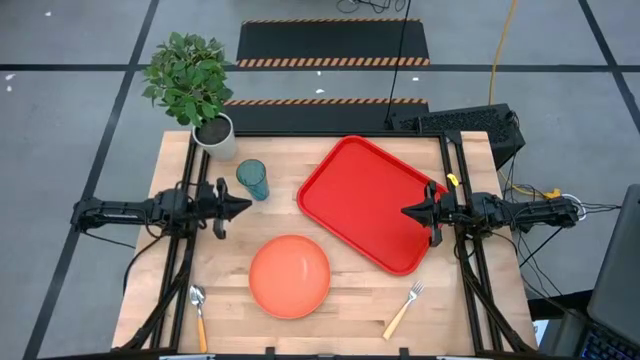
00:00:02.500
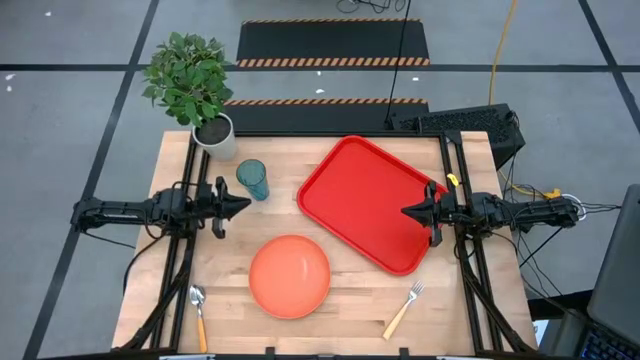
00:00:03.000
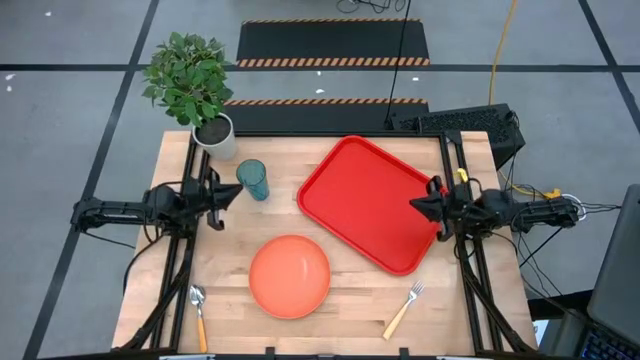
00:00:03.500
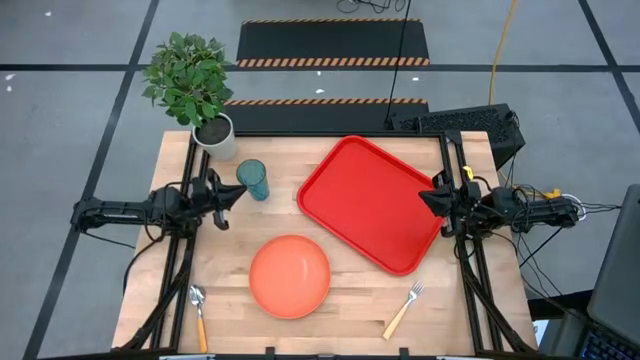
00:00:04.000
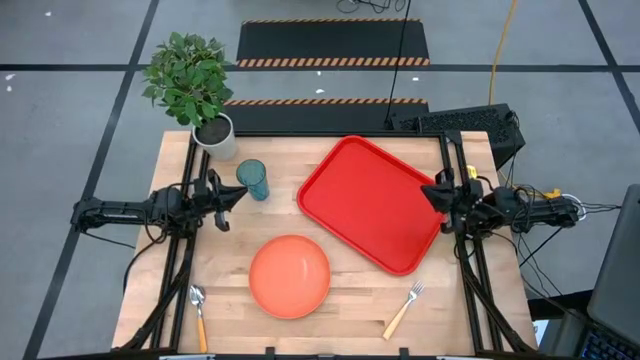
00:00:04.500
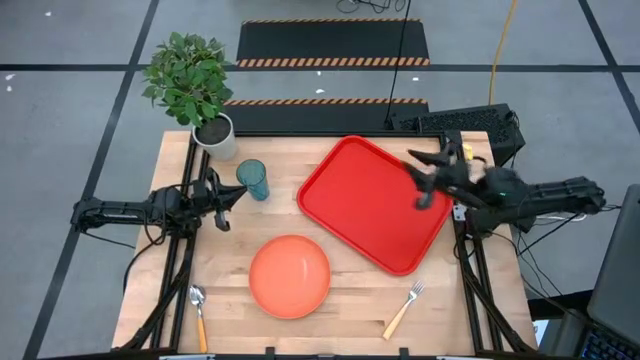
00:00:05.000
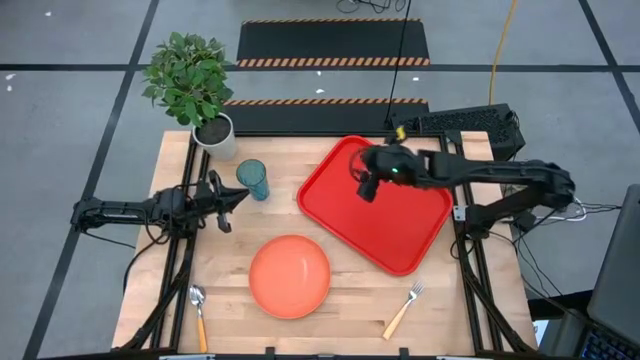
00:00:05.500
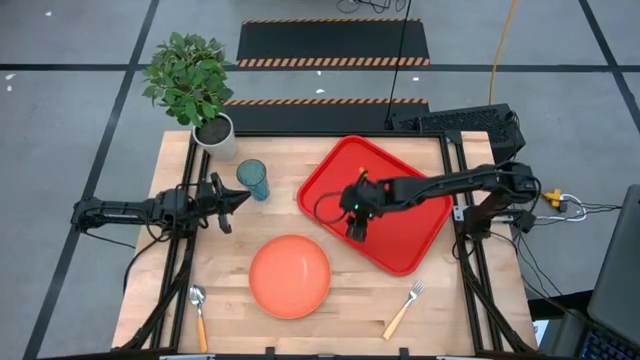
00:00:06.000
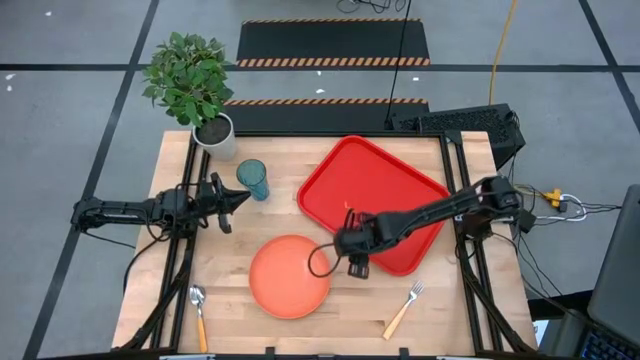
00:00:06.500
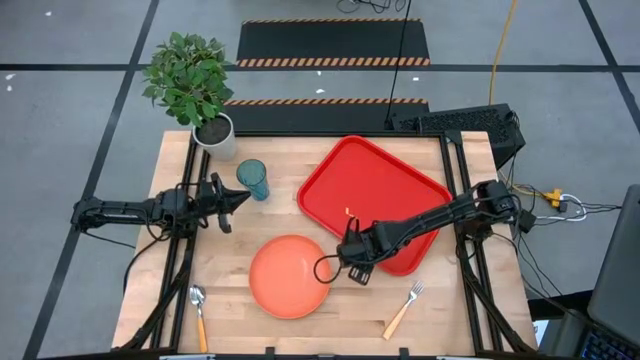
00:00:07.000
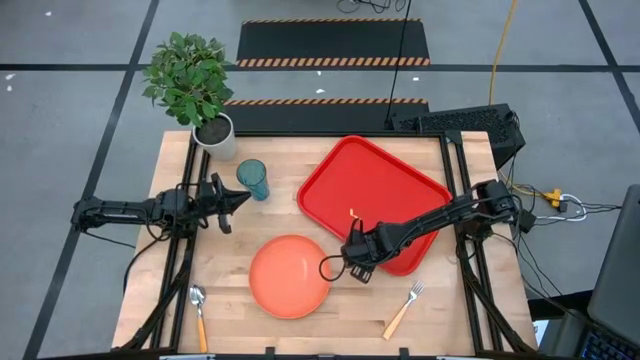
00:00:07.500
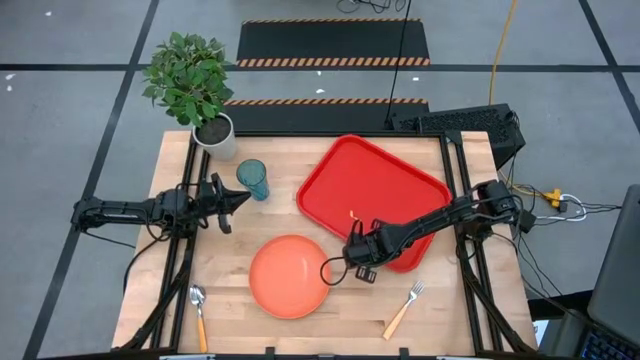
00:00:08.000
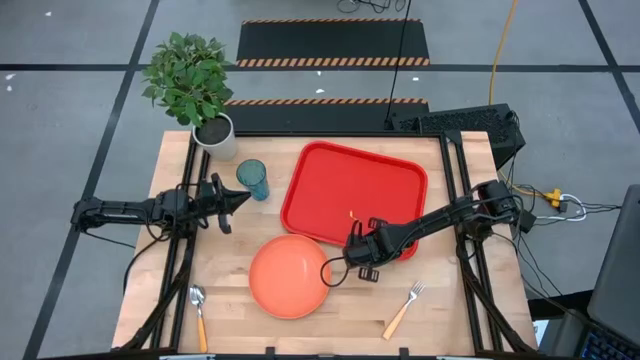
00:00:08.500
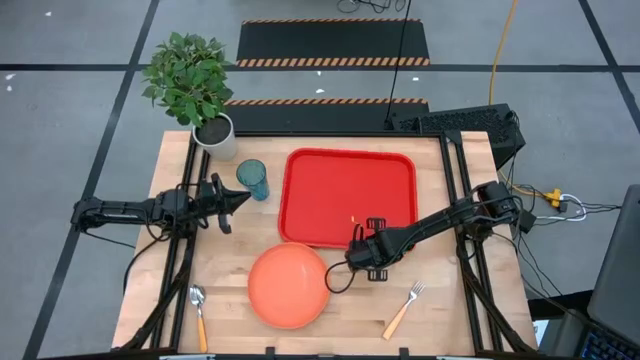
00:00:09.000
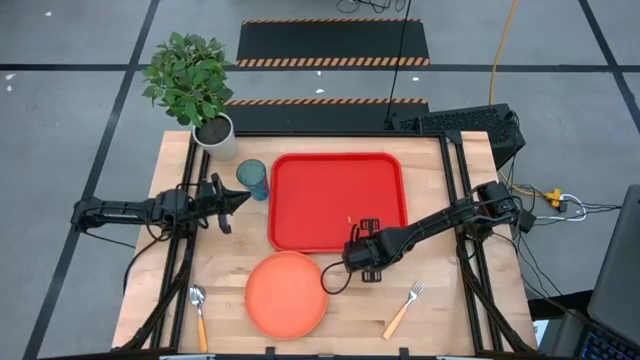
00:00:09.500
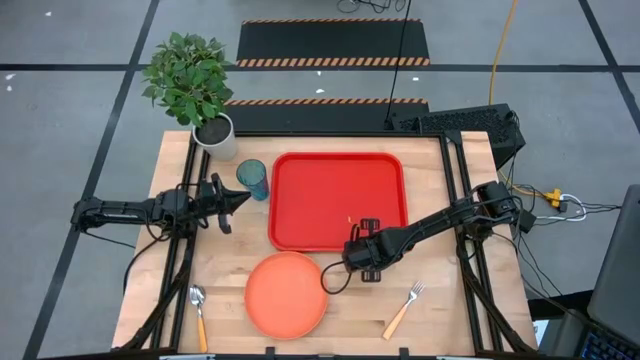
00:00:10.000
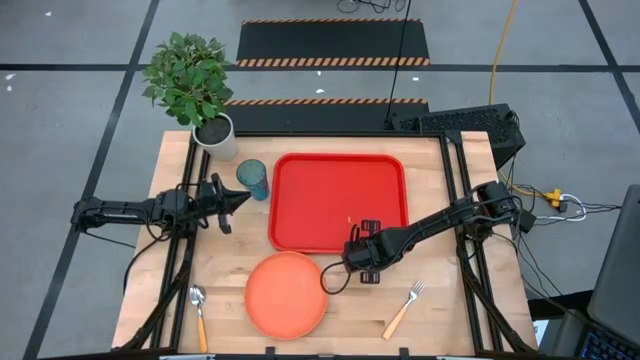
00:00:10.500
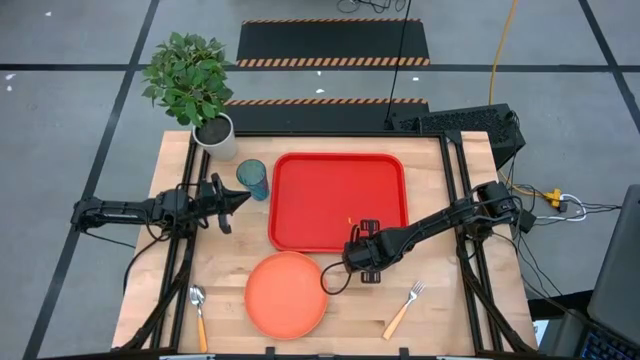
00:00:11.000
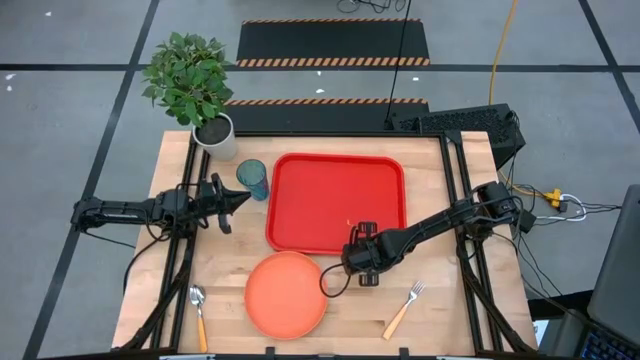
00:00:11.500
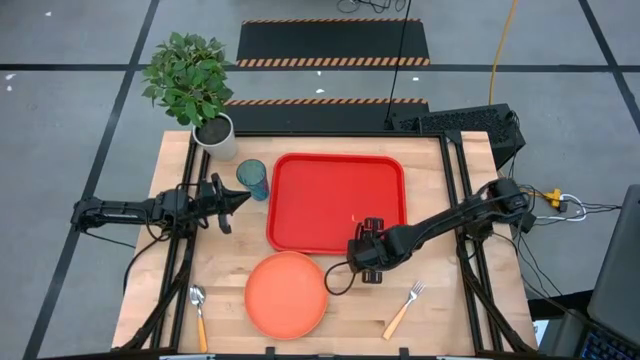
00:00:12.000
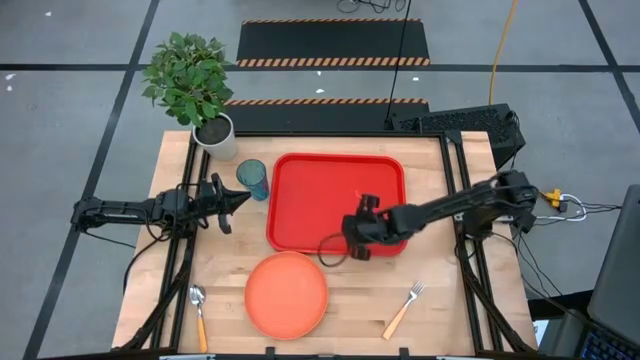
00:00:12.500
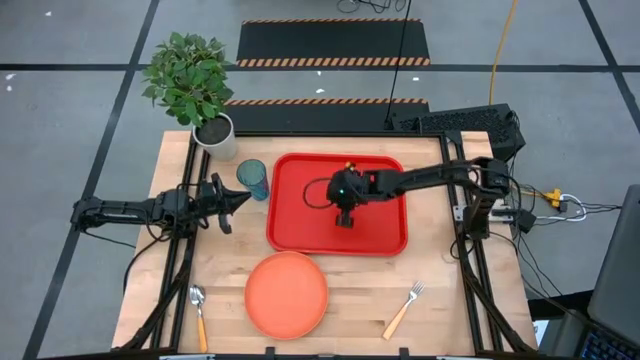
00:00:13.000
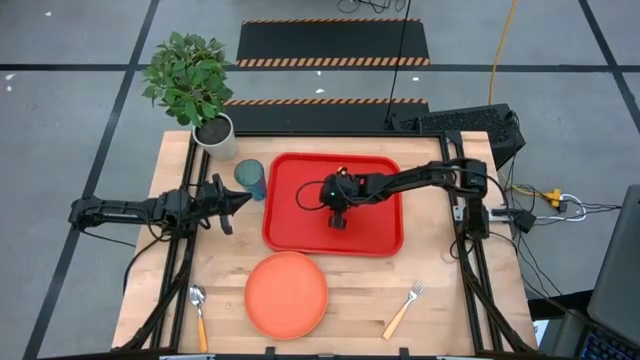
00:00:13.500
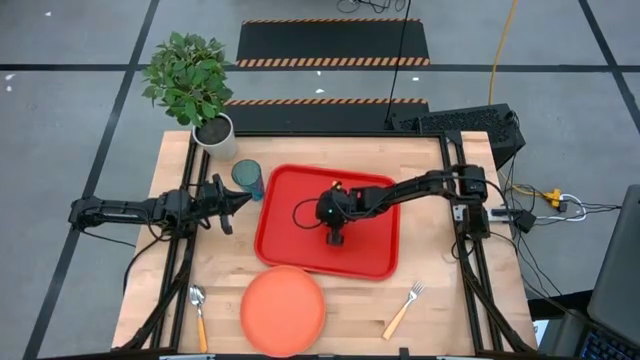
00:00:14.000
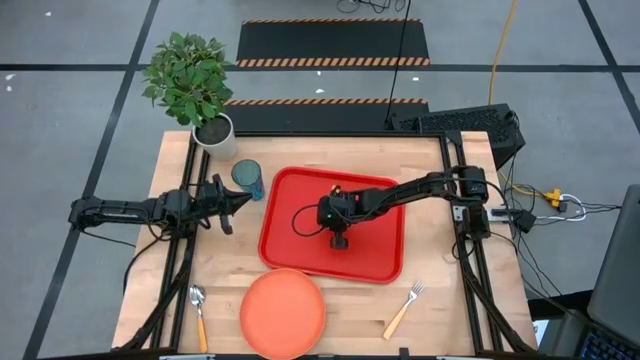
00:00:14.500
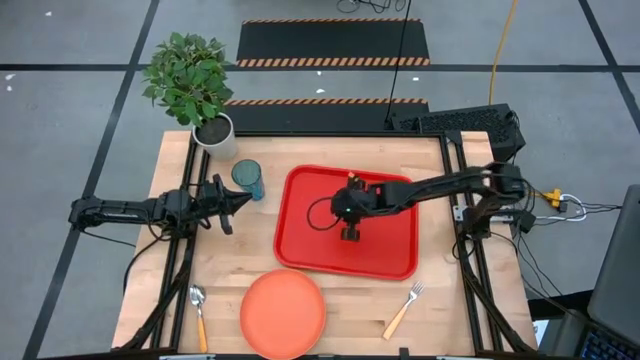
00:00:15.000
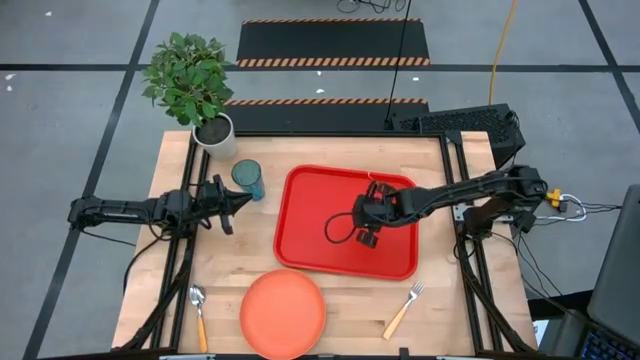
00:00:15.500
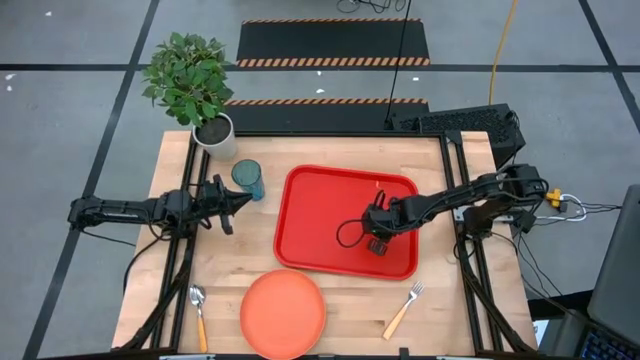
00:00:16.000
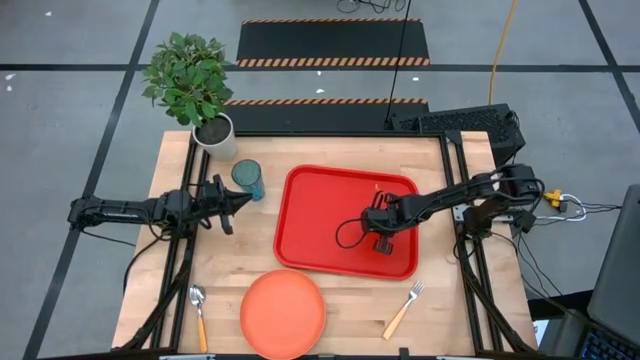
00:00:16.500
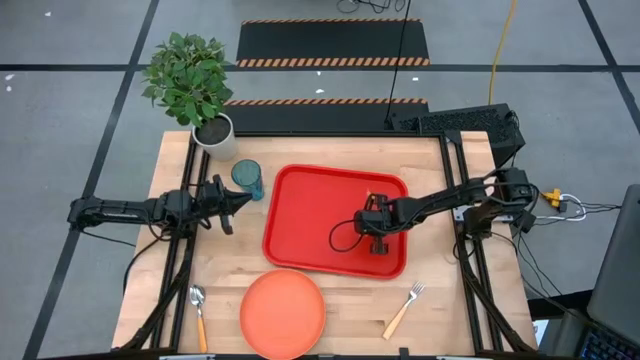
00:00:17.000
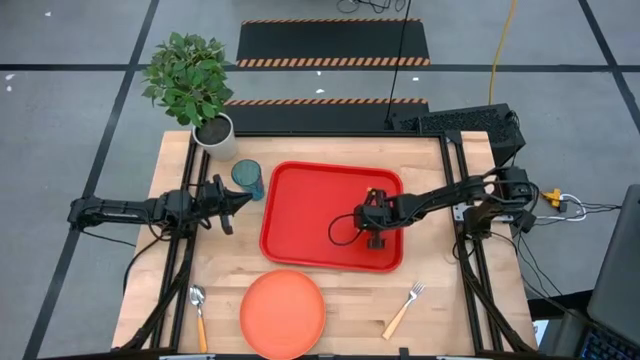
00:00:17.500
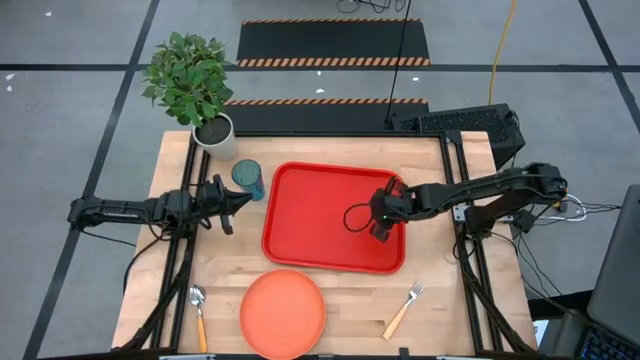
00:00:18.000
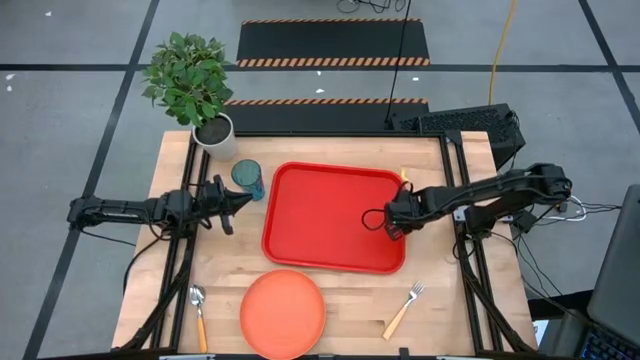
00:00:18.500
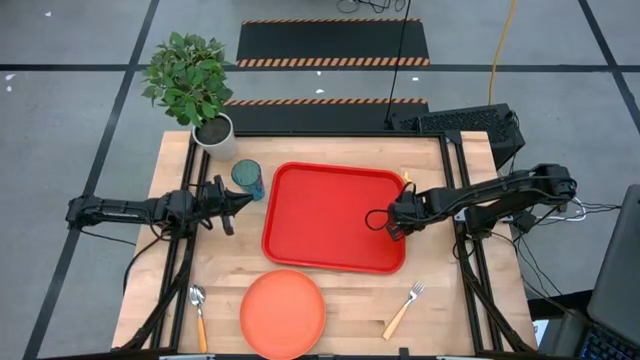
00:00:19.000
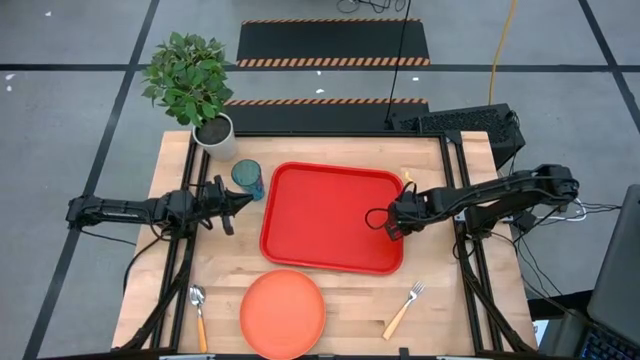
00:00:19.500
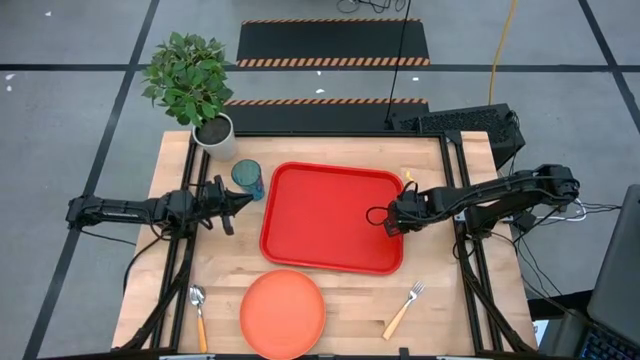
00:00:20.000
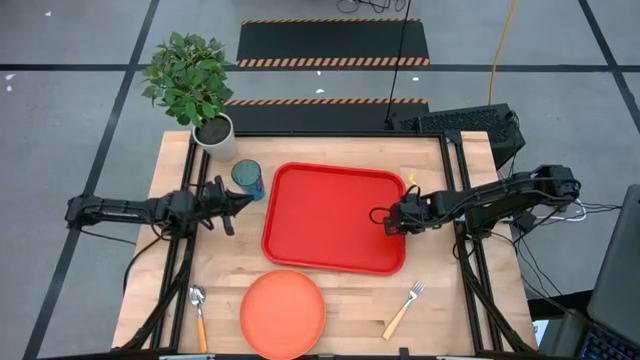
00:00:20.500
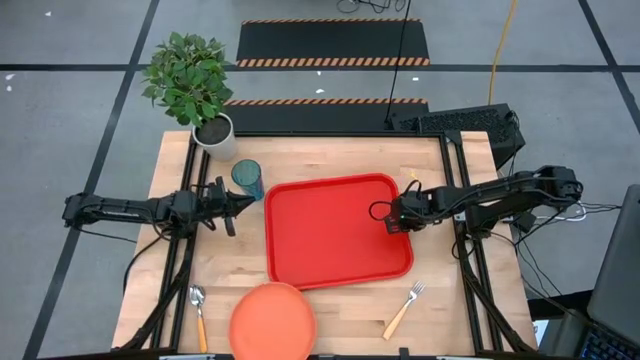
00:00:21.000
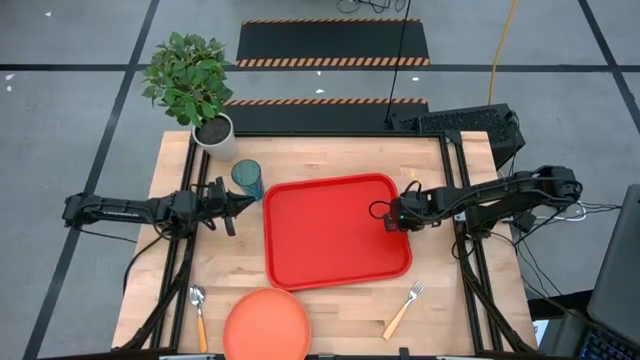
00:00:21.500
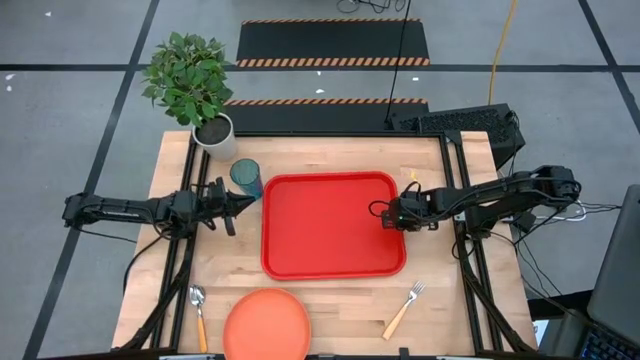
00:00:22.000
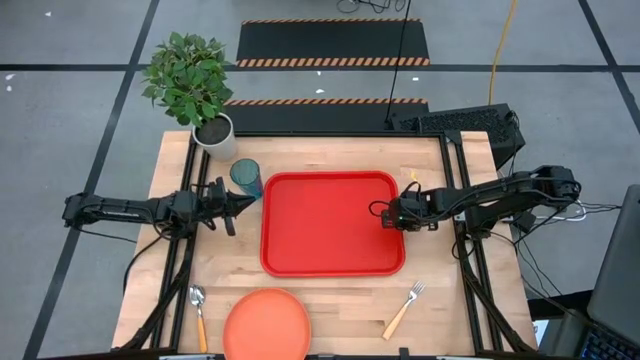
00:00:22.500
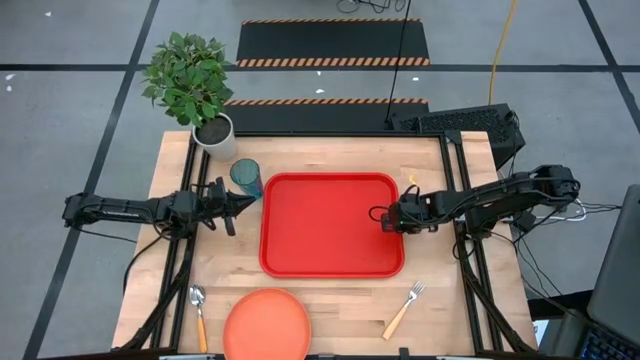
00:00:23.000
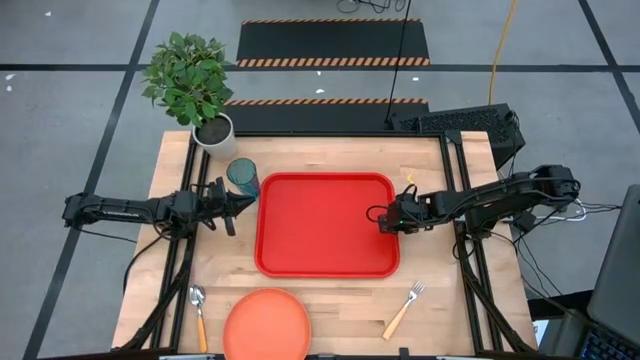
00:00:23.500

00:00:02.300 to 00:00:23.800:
Task: Pick and place plate/cup/fork/spoon on tray
Prepare the red serving tray
